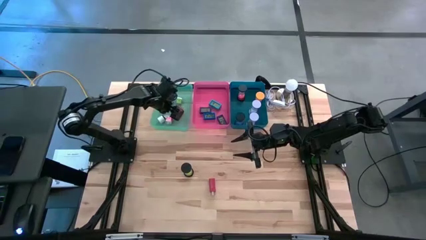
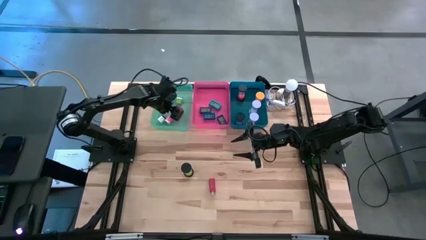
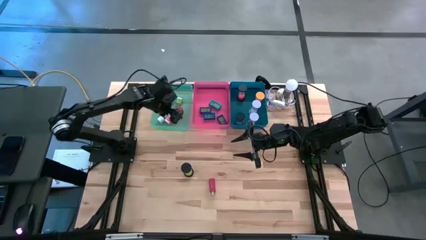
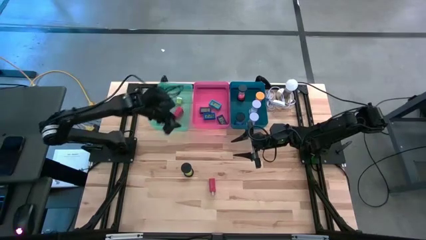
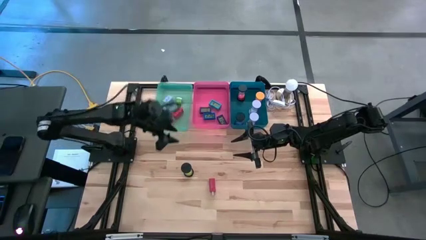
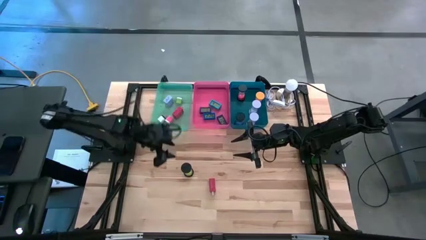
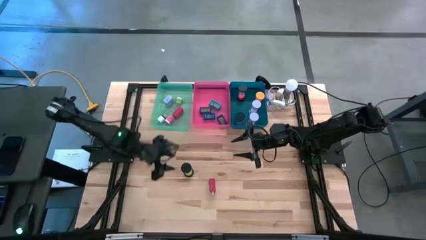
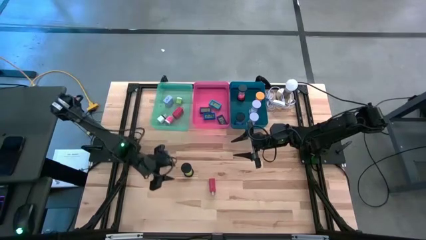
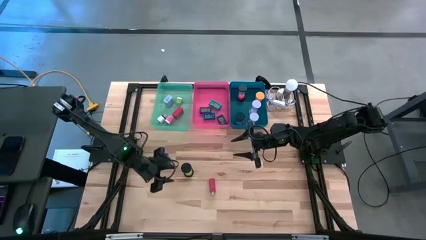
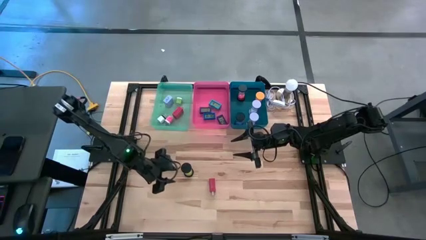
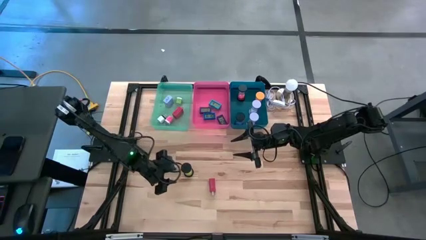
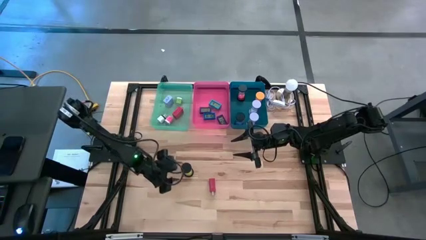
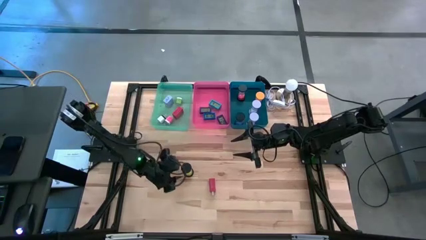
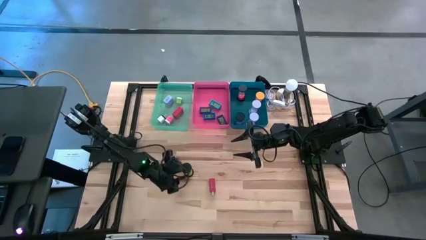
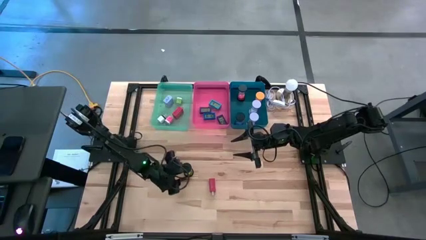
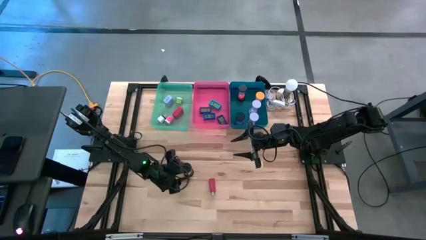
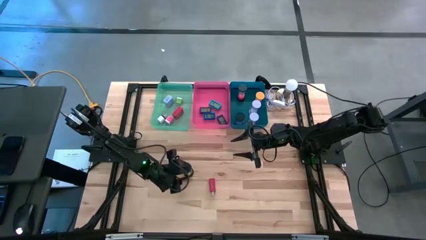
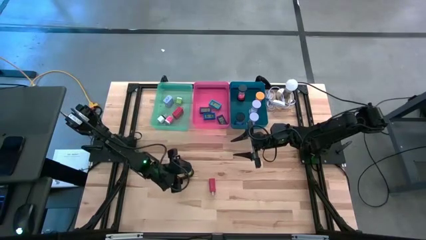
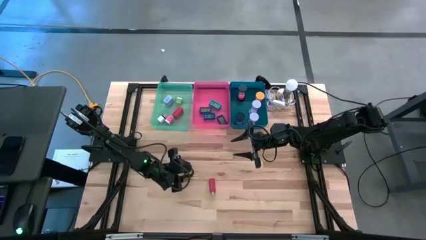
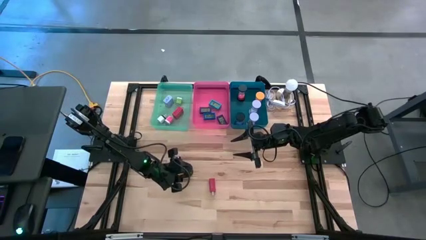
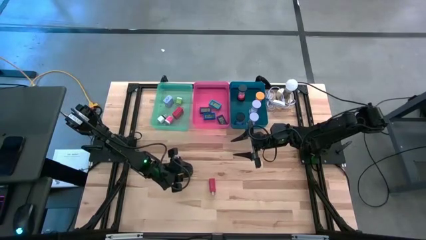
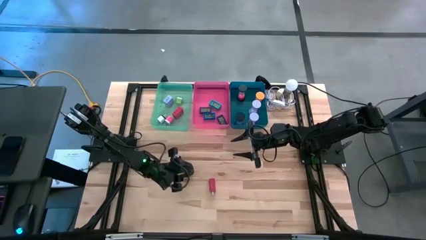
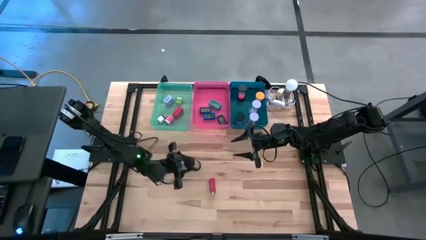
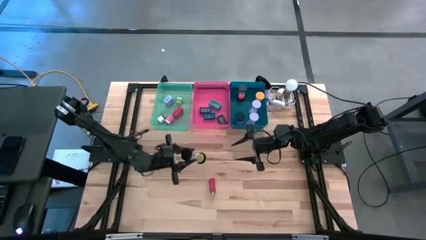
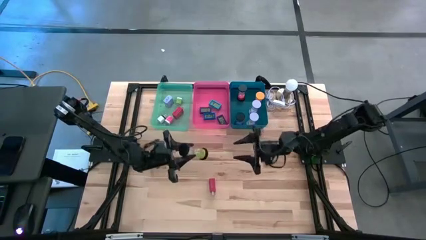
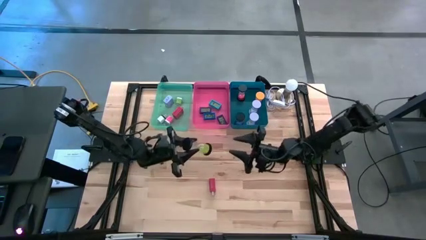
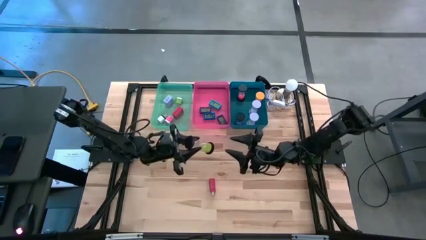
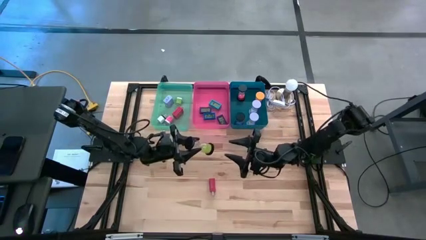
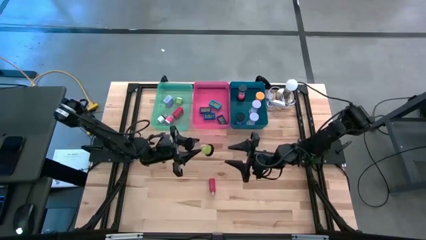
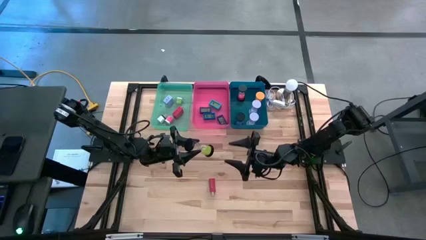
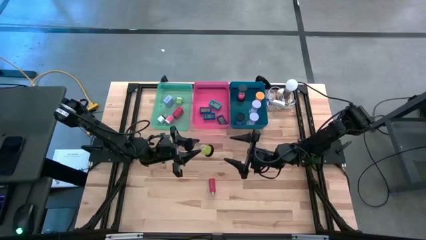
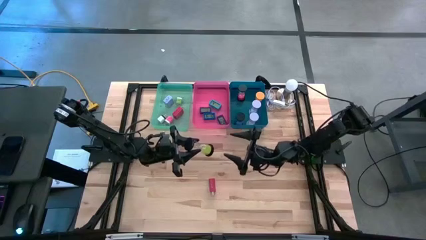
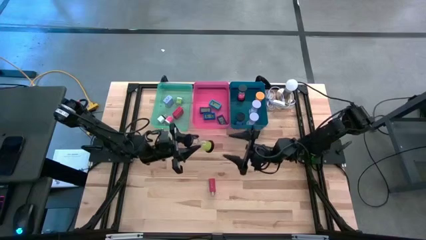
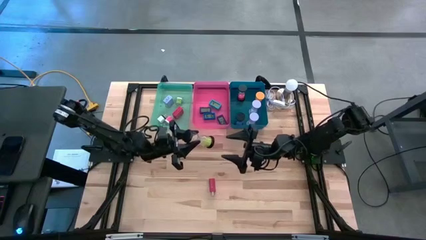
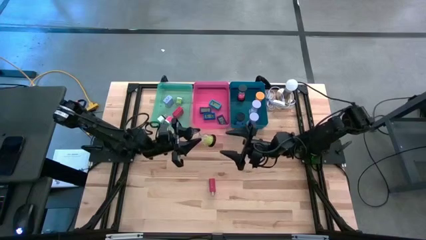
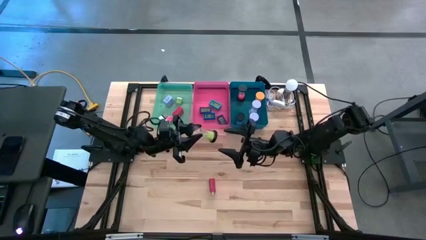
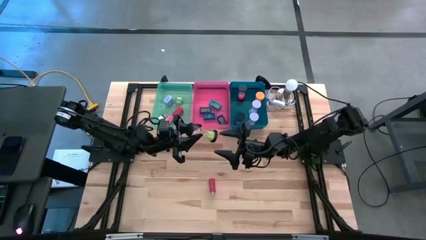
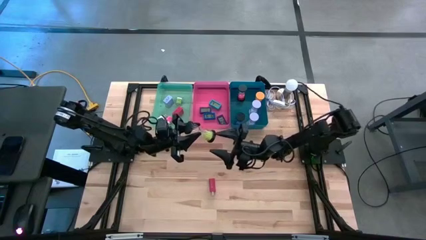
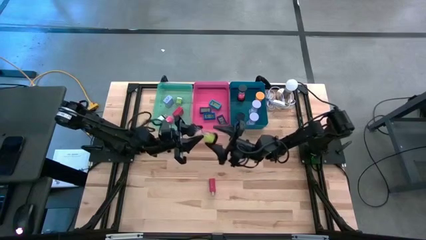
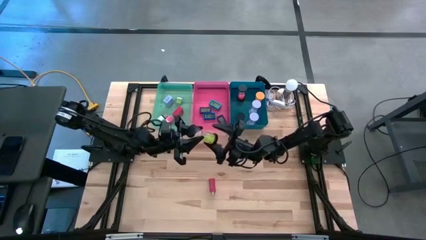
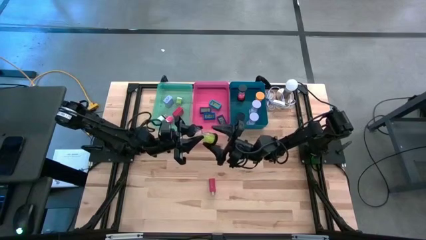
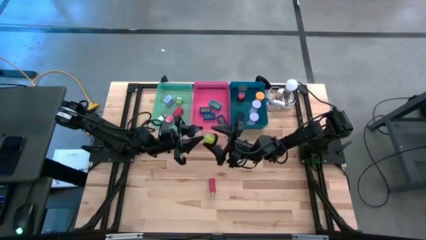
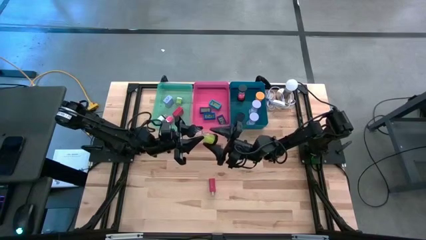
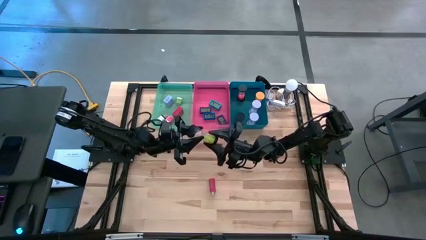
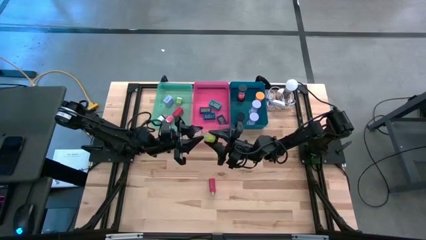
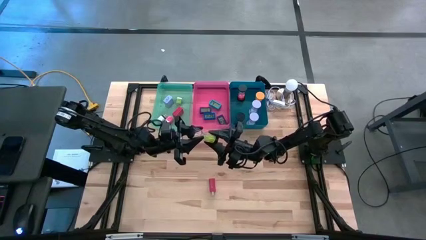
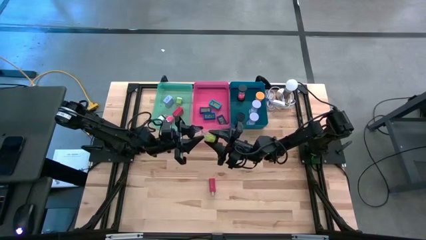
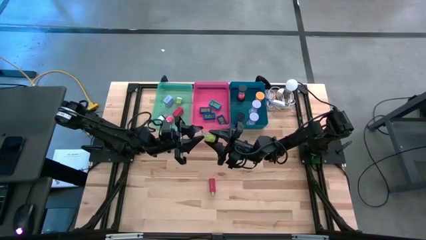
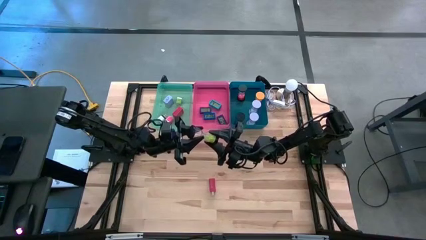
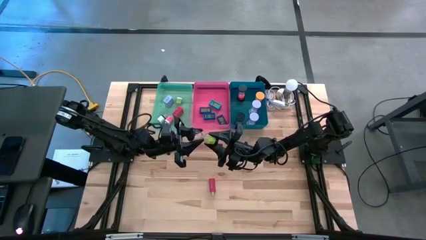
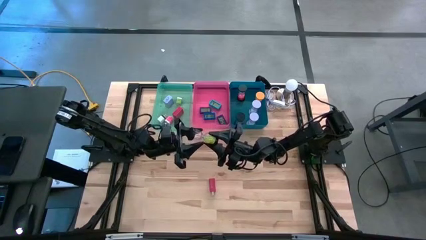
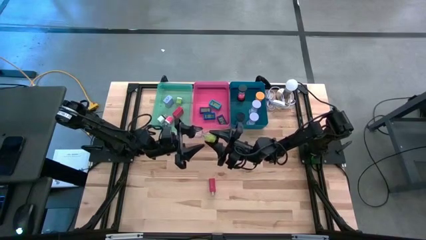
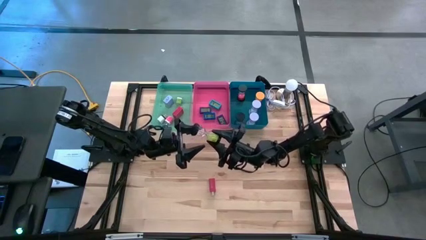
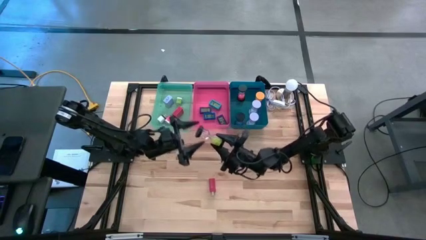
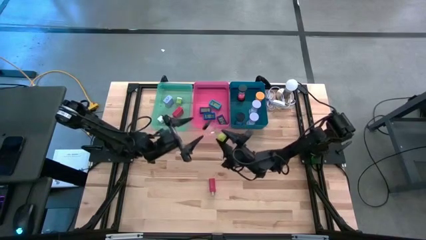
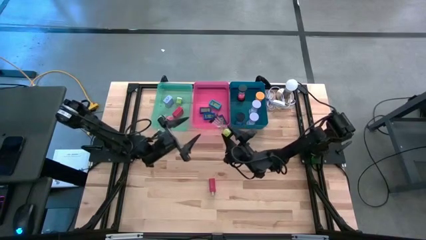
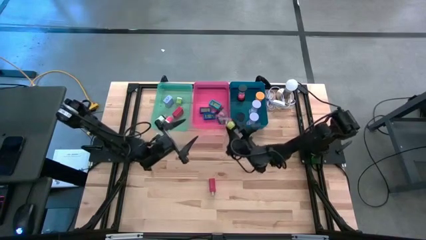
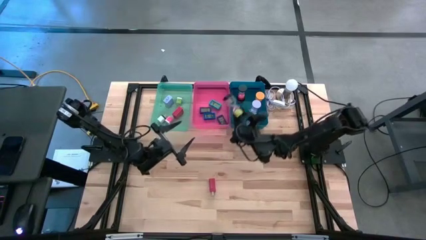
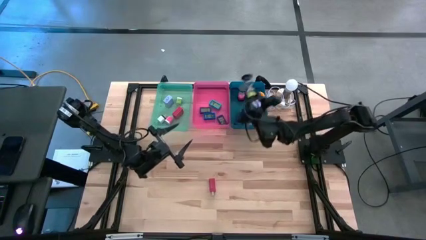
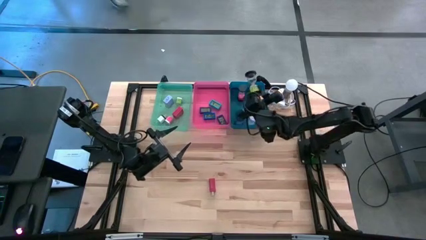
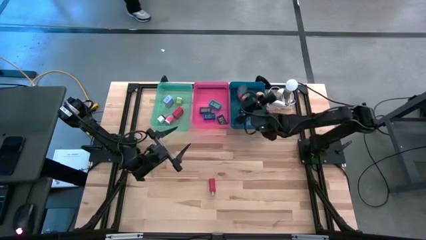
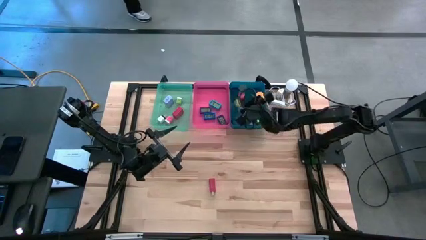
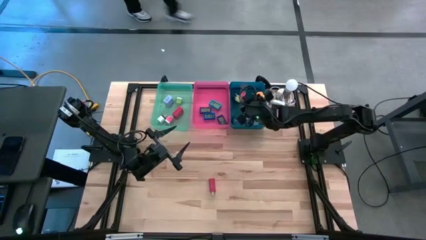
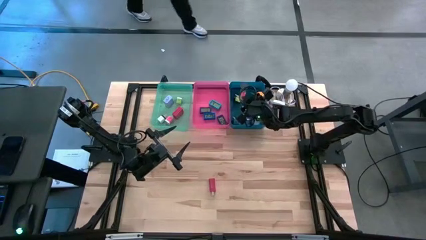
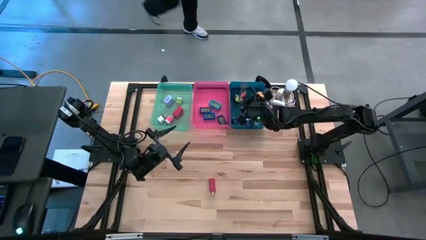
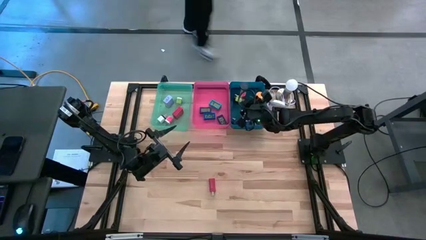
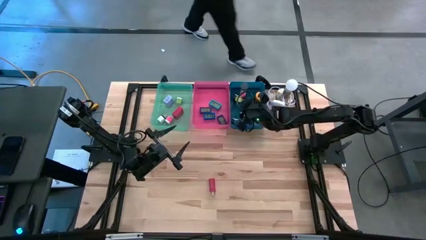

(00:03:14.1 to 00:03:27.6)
Task: Pick & Place Office items
Put the yellow black hourglass into the blue bin

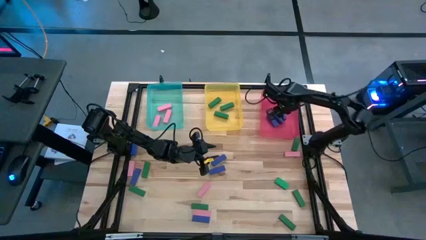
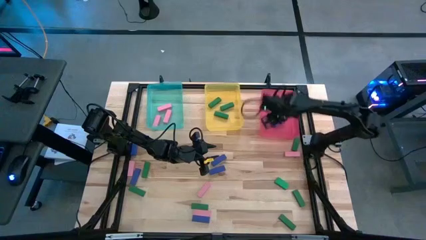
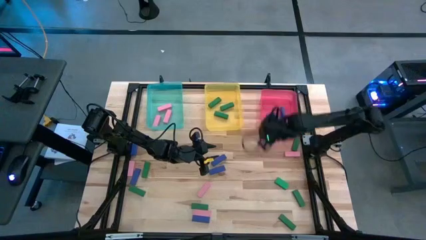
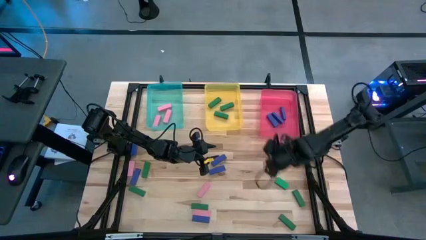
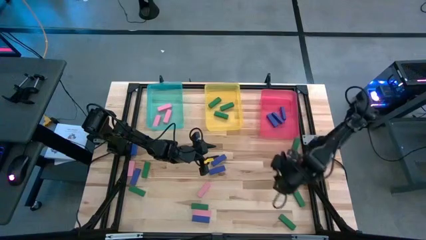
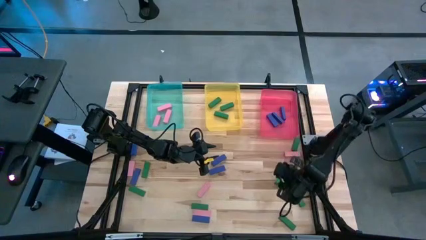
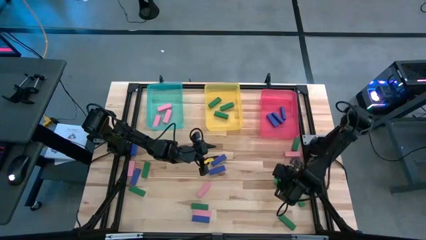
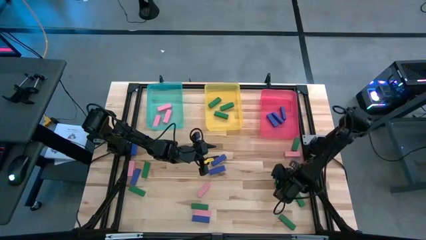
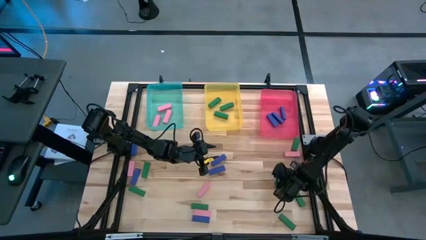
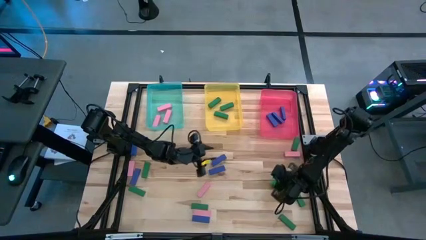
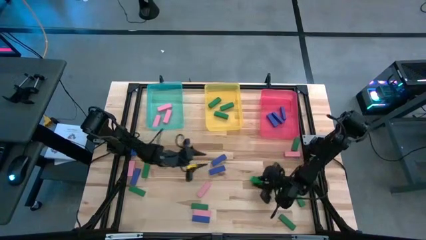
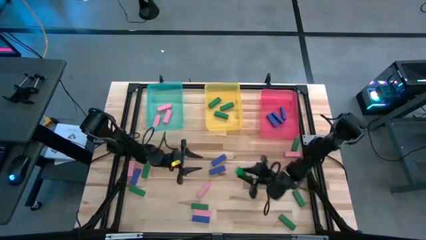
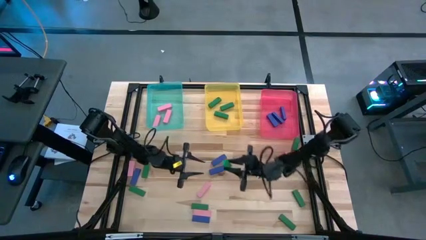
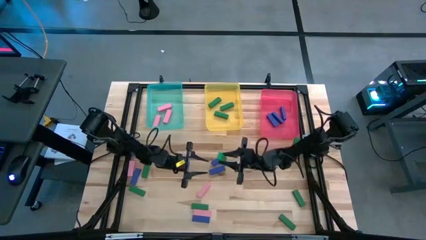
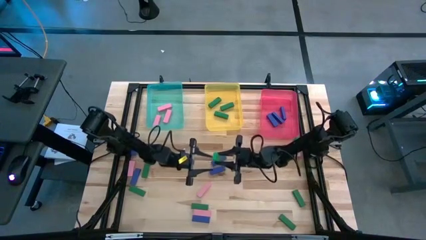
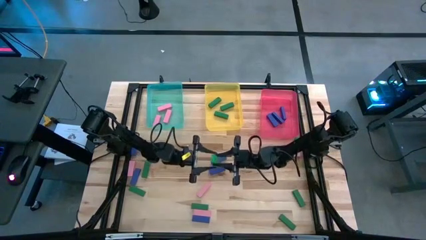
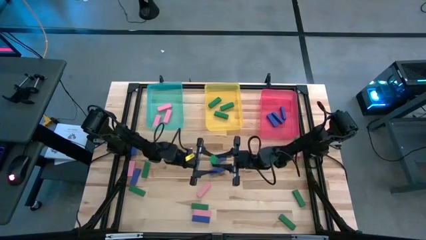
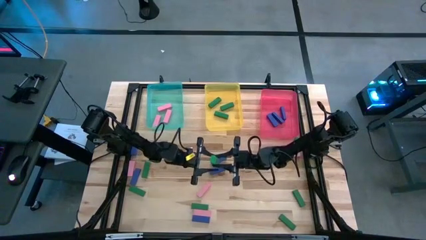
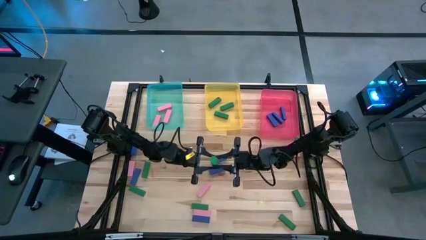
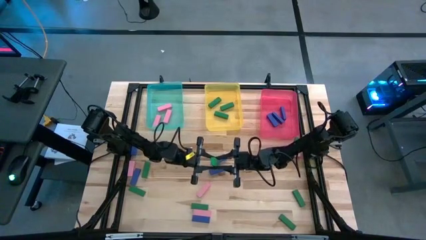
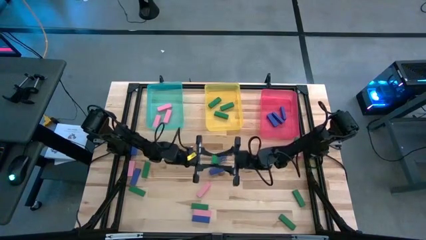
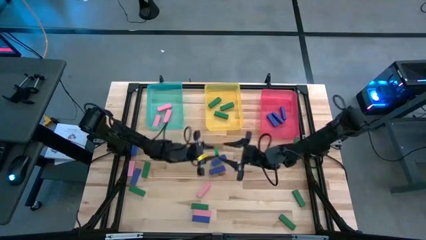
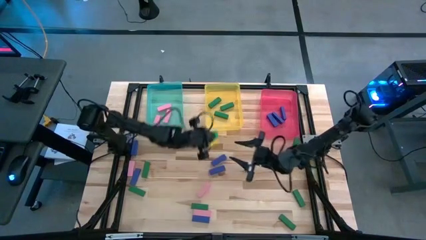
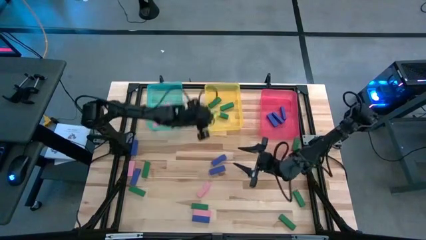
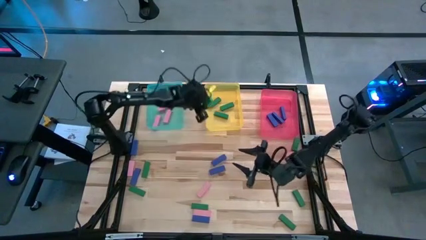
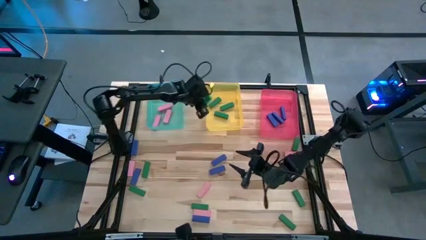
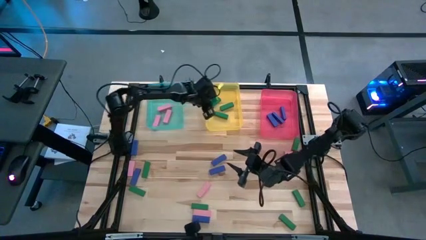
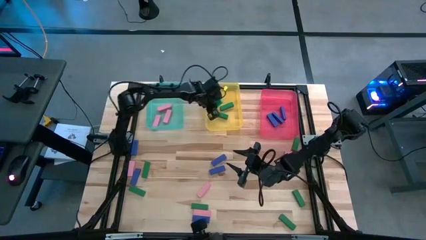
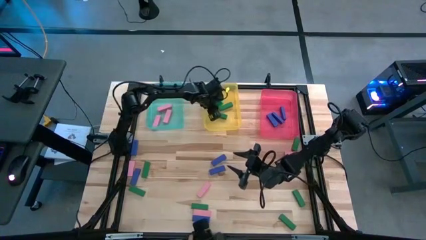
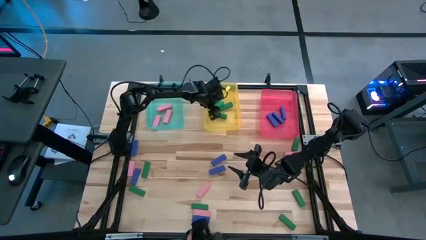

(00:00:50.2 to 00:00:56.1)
Task: Sort blocks
Put the green wooden block into the yellow bin
